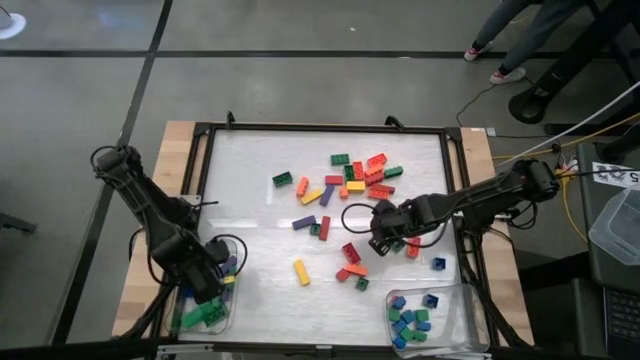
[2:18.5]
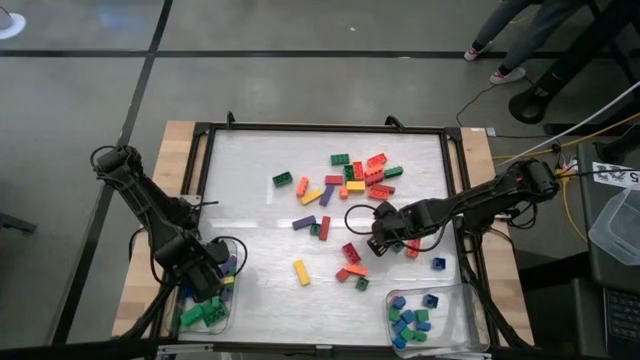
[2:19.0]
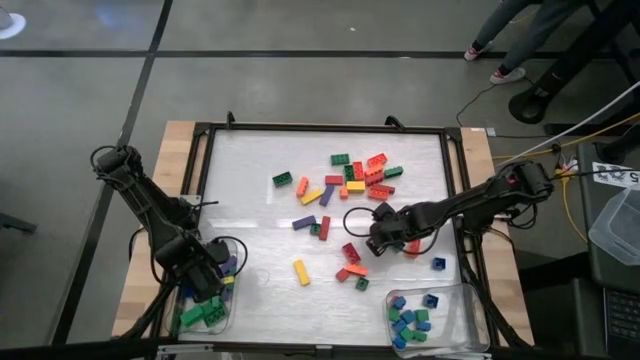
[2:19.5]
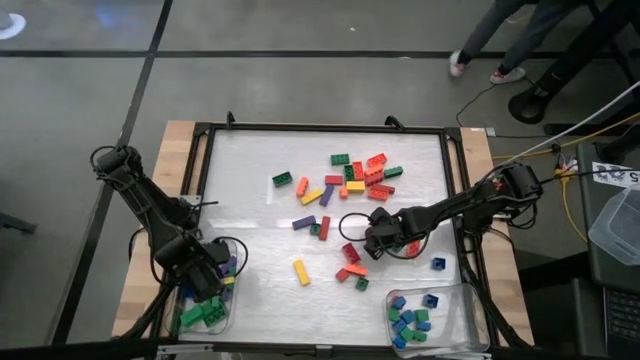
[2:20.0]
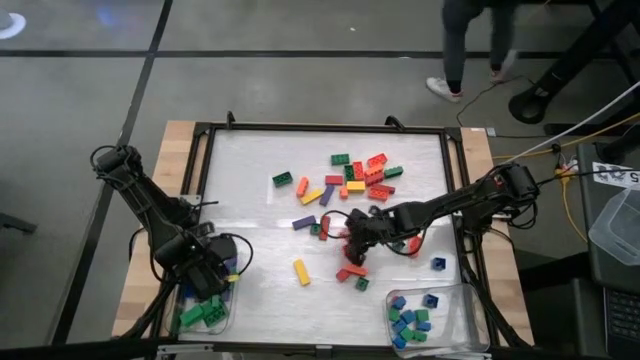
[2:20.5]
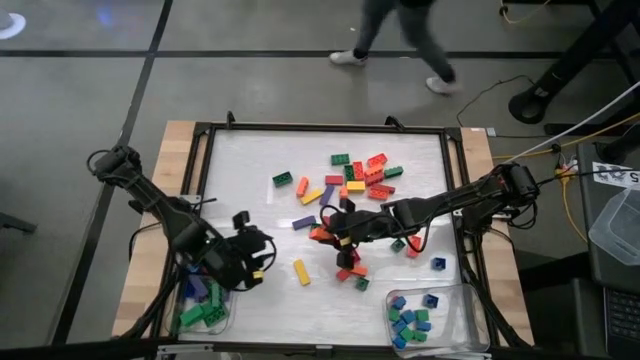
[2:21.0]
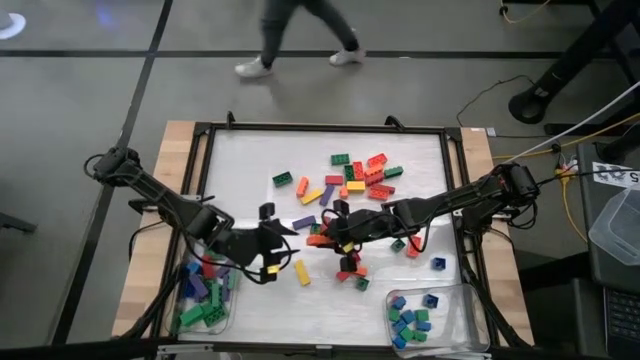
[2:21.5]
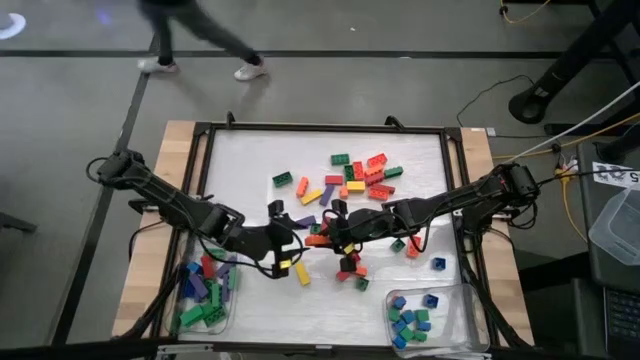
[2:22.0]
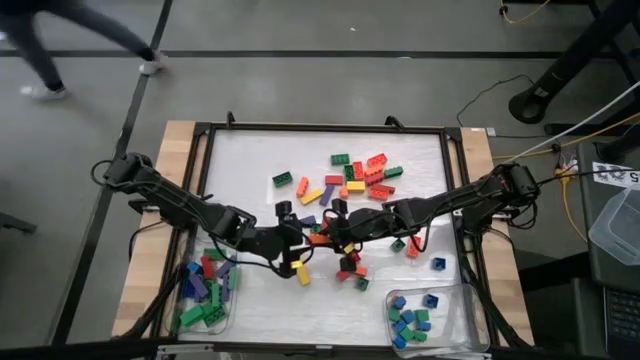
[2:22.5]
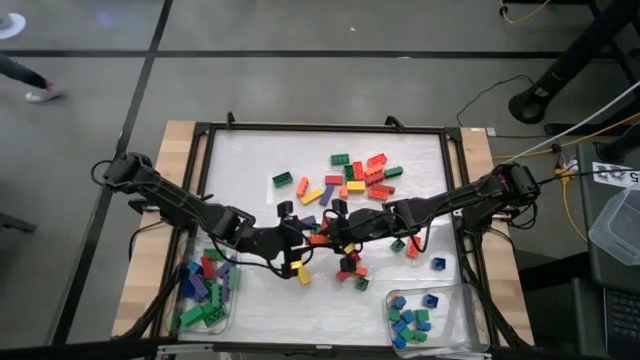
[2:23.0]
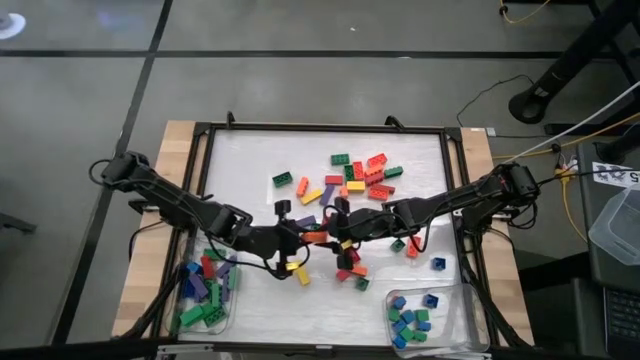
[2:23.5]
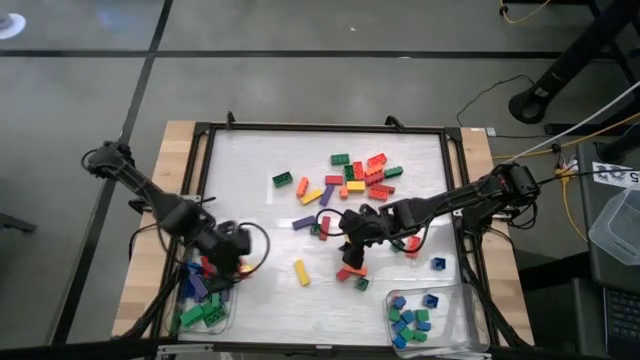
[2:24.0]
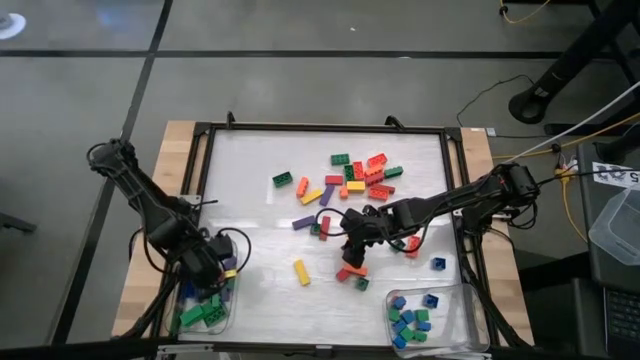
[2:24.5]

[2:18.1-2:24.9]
Task: Sort blocks by size
Put the large orange game piece into the left transparent bin

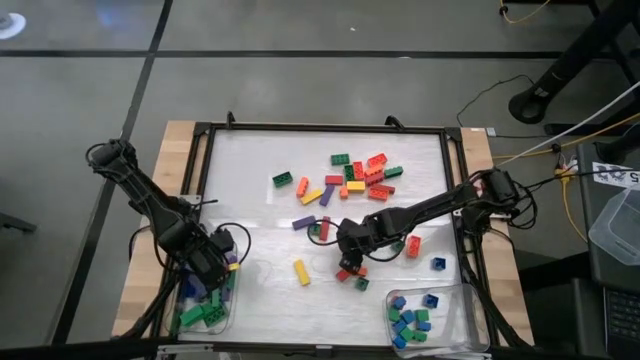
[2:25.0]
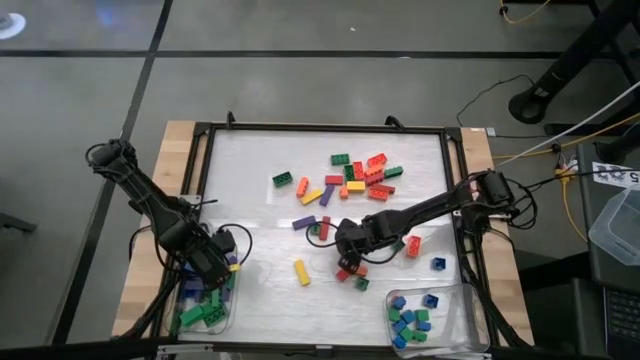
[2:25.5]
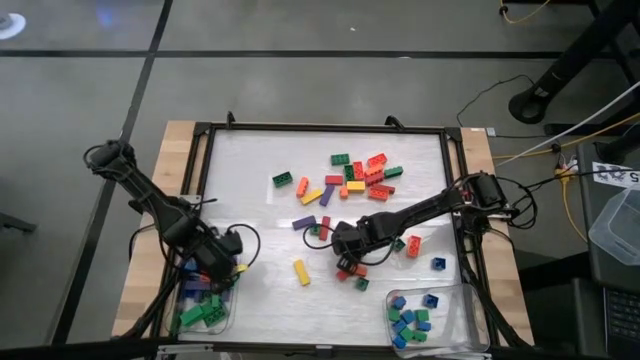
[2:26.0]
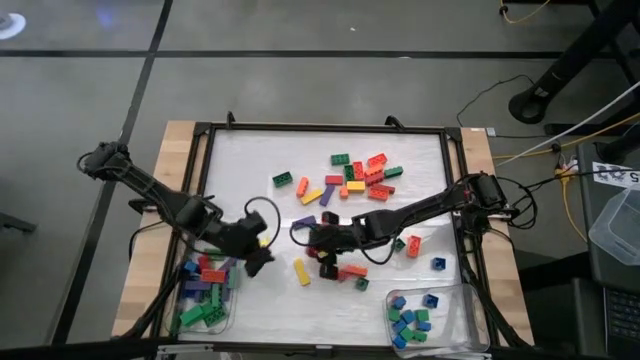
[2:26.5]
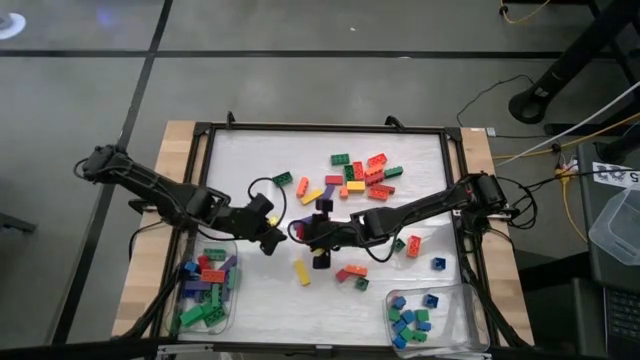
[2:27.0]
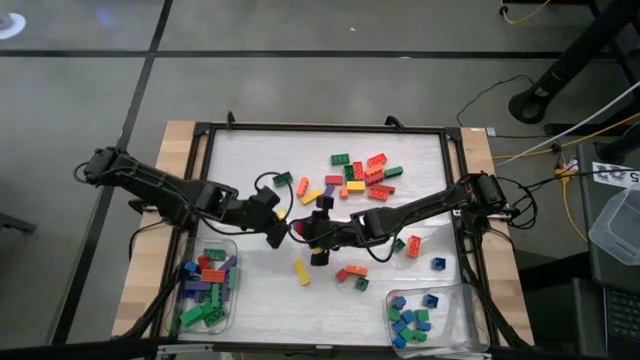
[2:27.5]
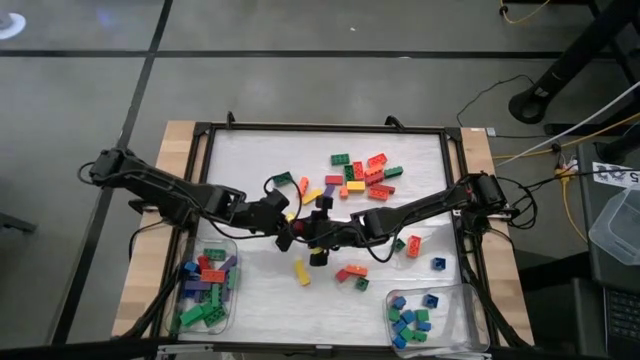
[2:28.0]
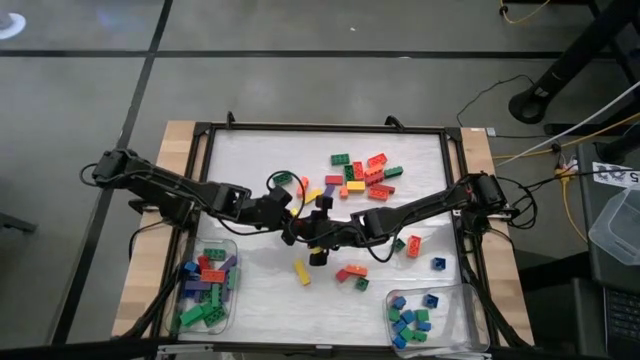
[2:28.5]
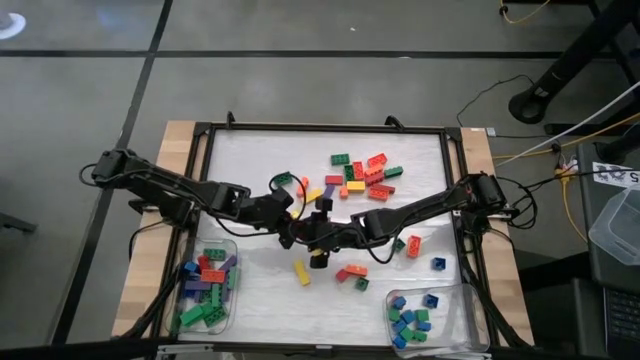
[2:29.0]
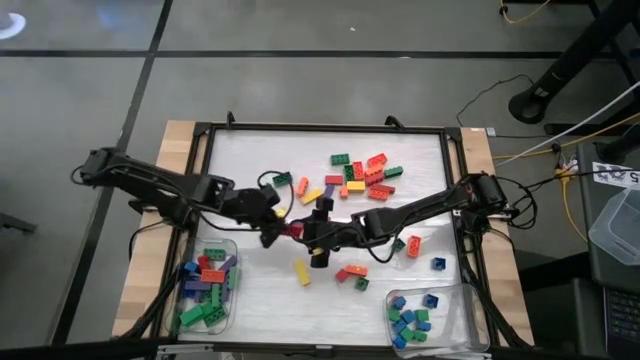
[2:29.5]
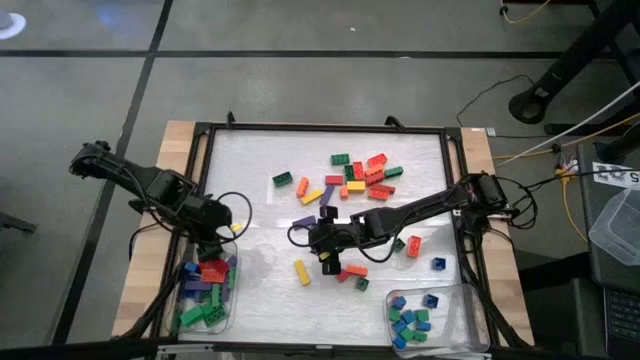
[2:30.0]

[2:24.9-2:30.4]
Put the large red game piece into the left transparent bin

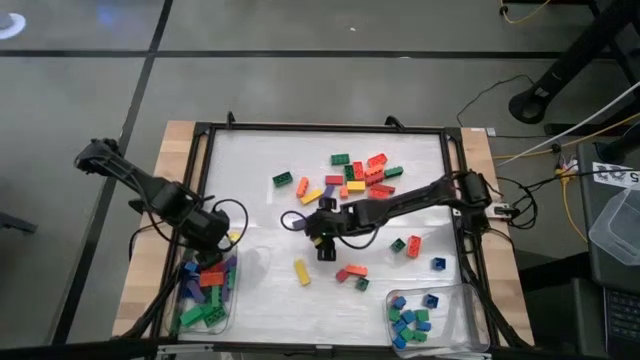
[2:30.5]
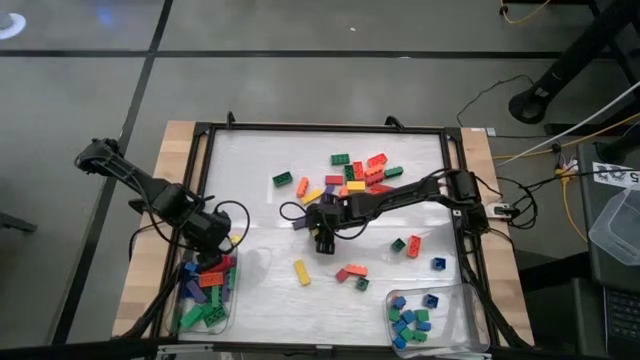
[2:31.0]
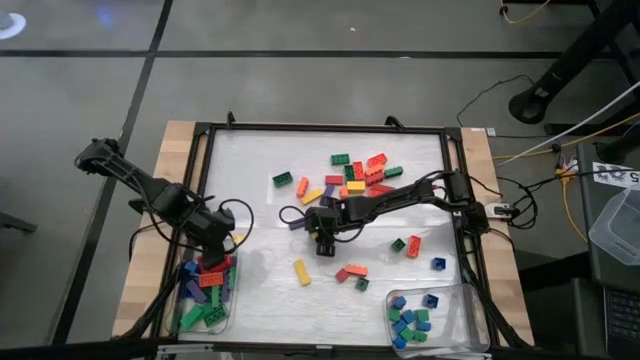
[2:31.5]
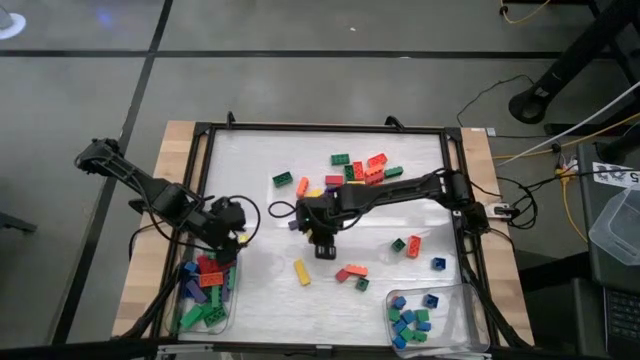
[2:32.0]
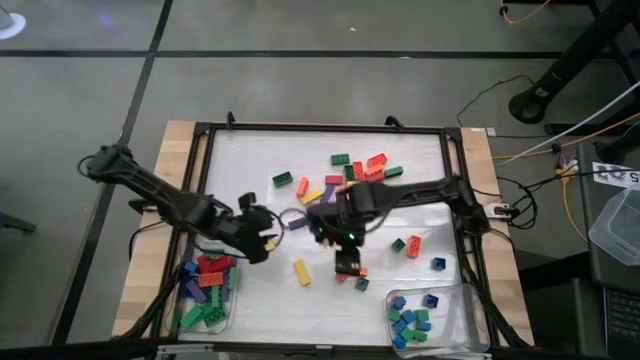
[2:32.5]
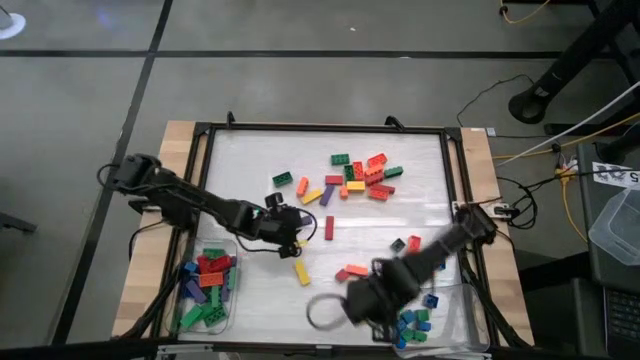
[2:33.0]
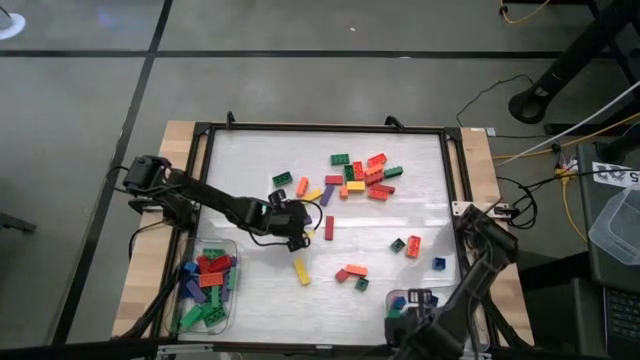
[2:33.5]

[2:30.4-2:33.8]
Put the small green game piece into the right transparent bin

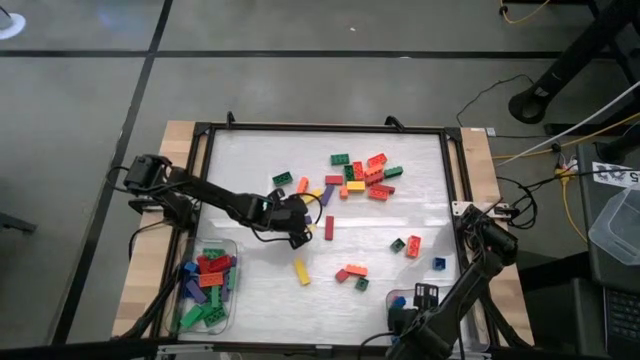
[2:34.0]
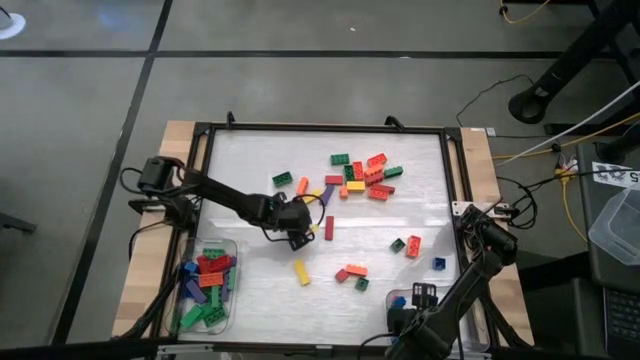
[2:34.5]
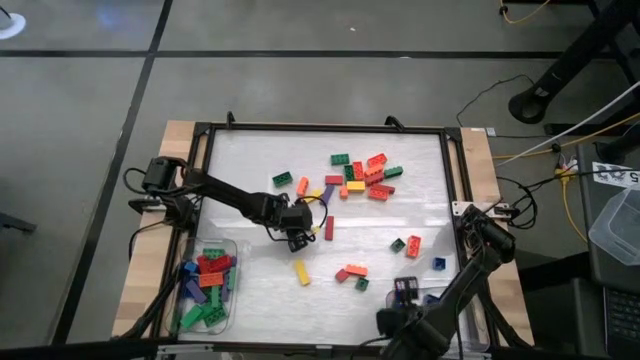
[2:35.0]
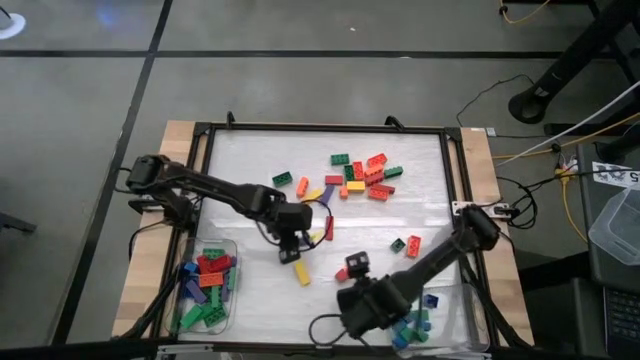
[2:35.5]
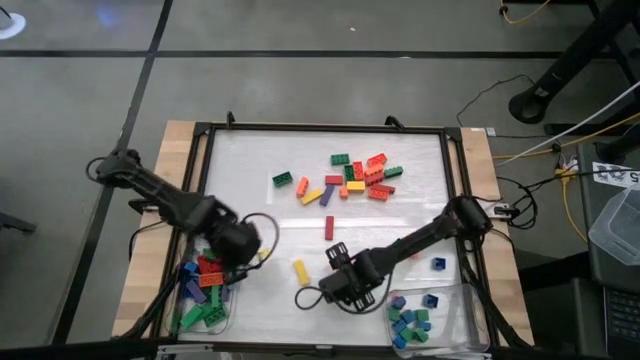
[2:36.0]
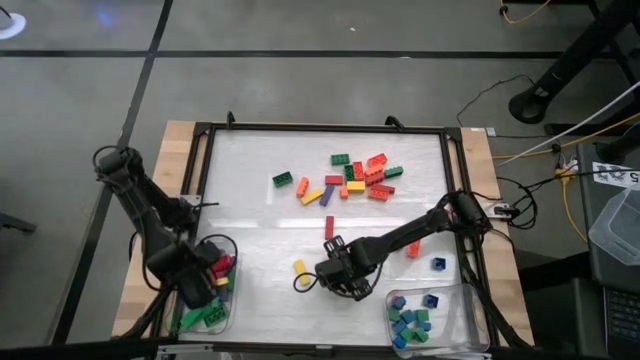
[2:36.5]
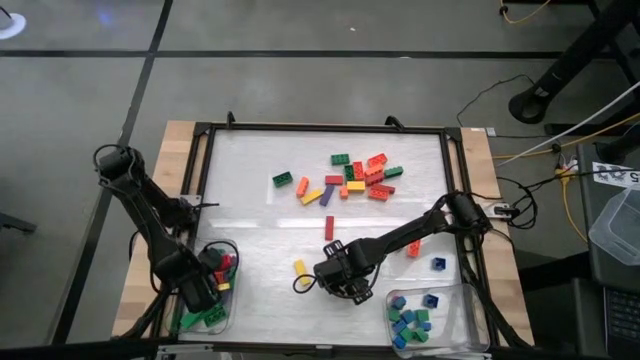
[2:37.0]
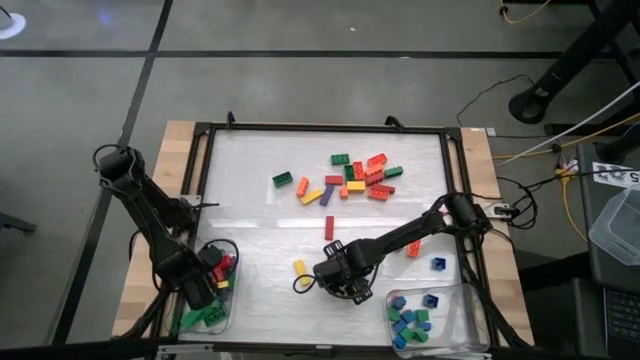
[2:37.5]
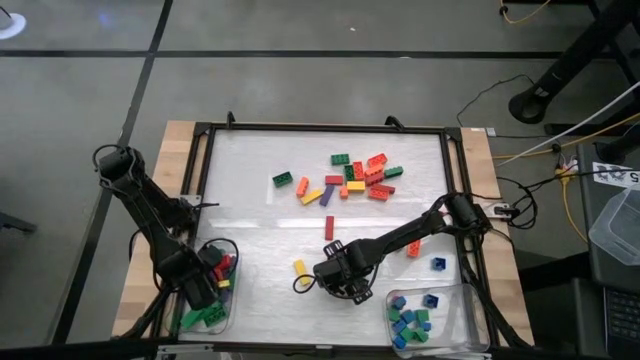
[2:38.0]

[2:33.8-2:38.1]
Put the large violet block into the left transparent bin

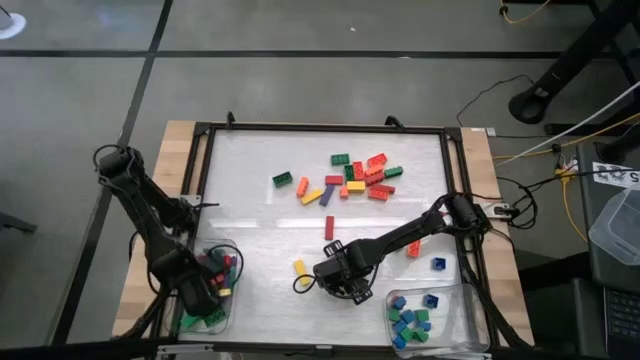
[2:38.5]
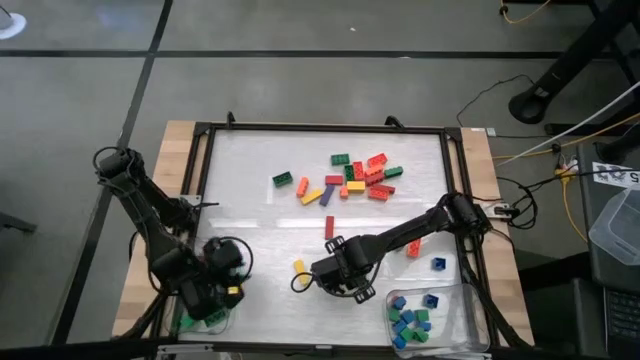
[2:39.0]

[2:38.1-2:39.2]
Put the small red block into the right transparent bin
